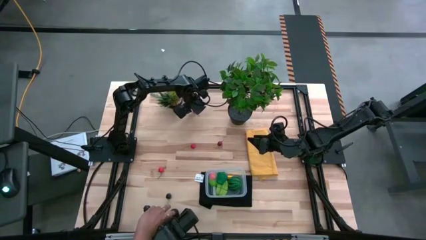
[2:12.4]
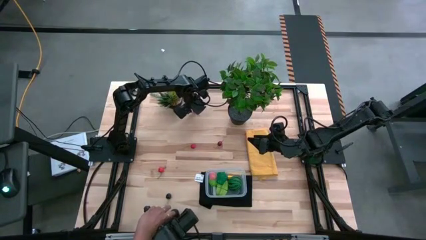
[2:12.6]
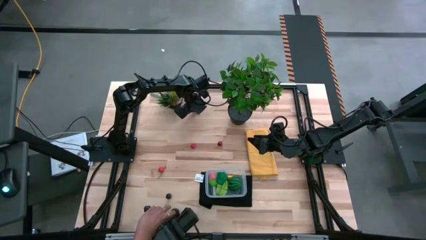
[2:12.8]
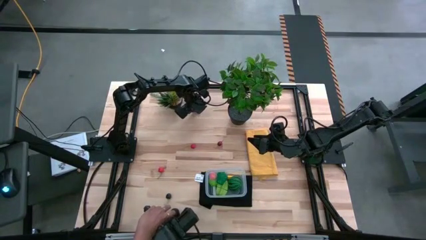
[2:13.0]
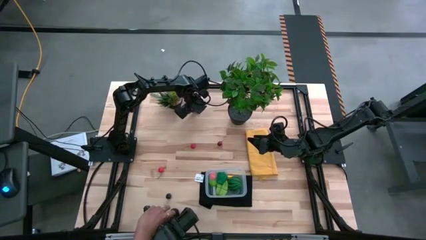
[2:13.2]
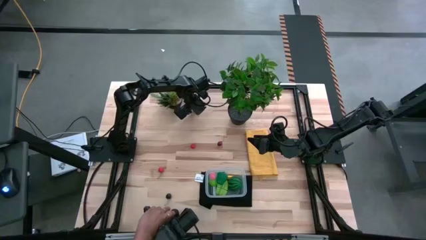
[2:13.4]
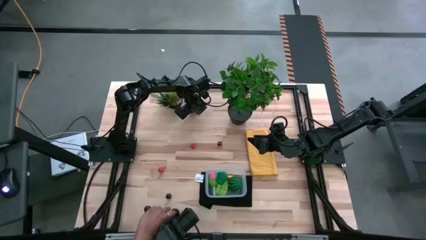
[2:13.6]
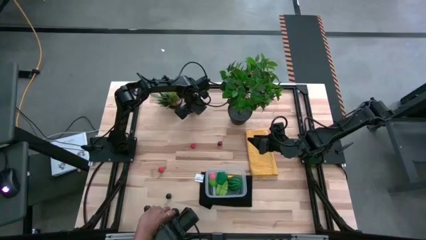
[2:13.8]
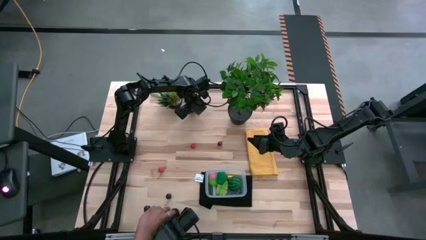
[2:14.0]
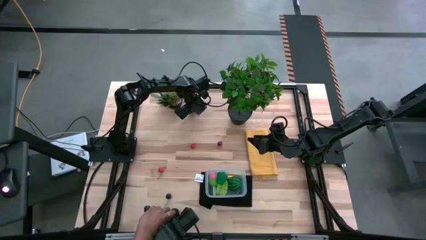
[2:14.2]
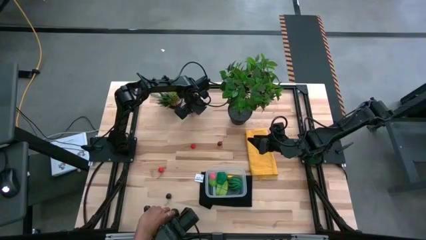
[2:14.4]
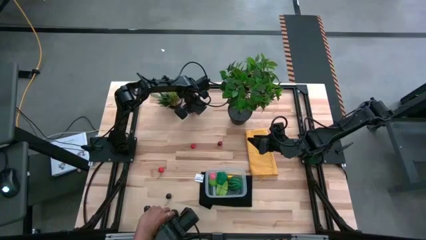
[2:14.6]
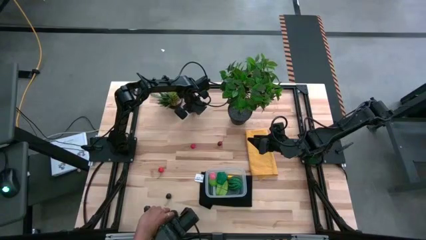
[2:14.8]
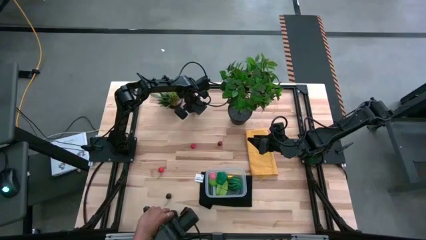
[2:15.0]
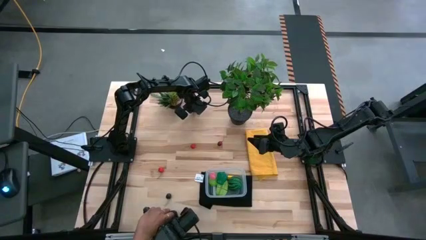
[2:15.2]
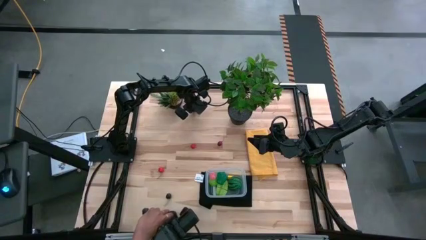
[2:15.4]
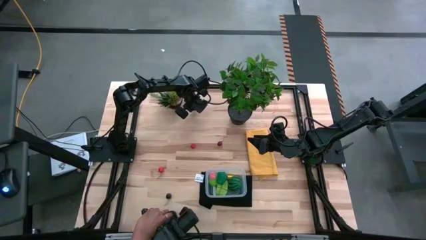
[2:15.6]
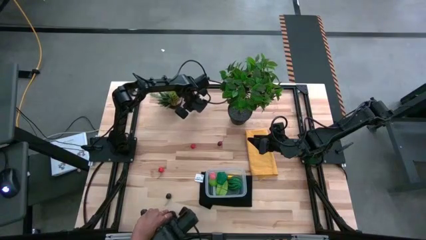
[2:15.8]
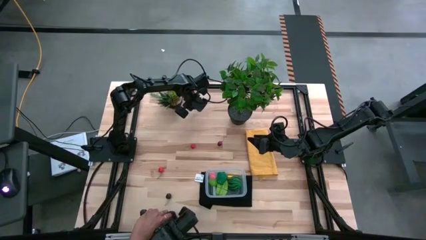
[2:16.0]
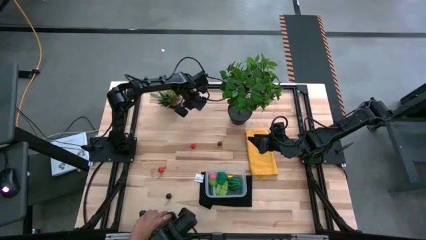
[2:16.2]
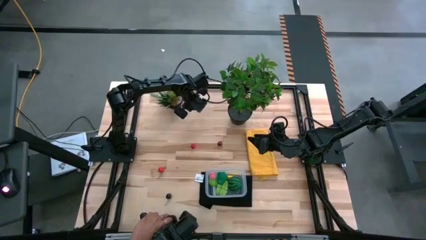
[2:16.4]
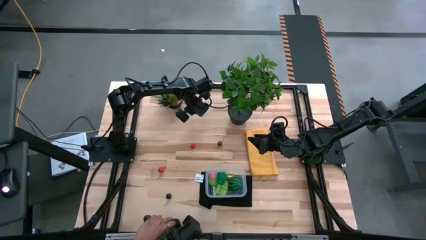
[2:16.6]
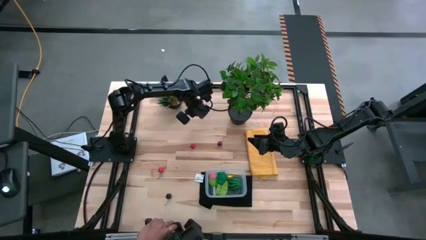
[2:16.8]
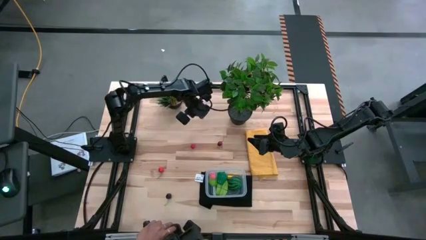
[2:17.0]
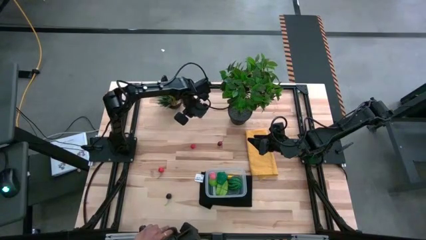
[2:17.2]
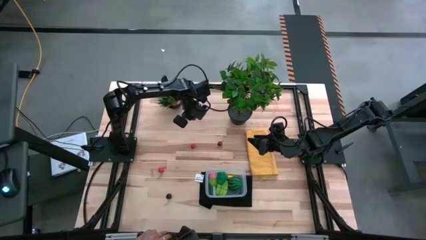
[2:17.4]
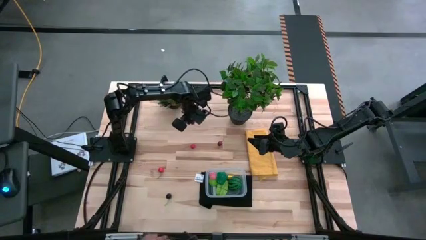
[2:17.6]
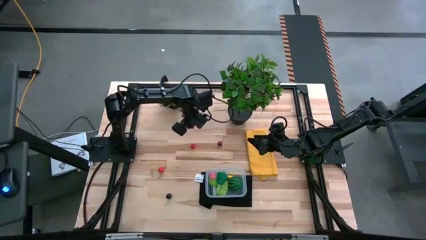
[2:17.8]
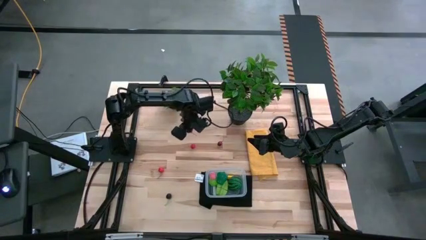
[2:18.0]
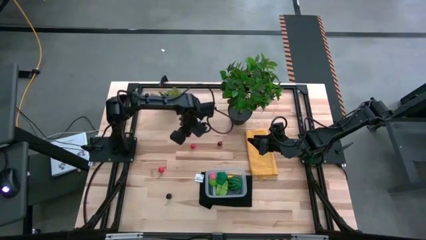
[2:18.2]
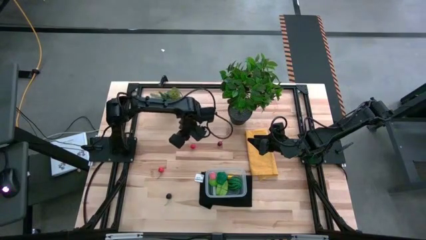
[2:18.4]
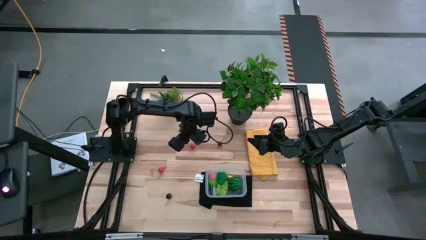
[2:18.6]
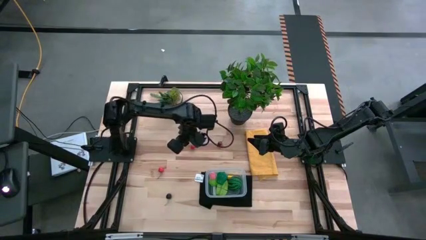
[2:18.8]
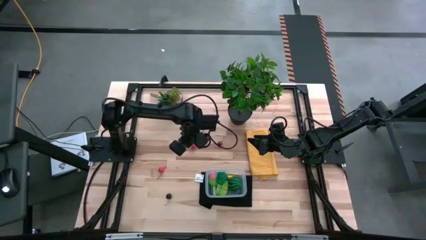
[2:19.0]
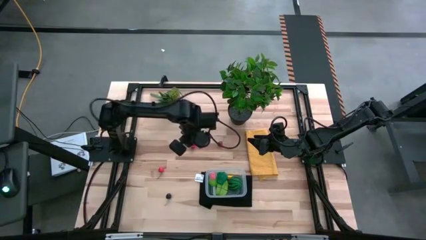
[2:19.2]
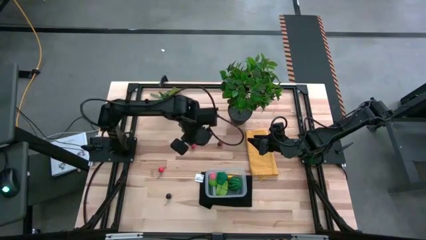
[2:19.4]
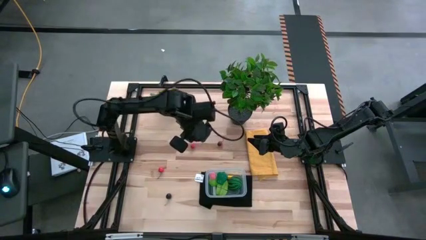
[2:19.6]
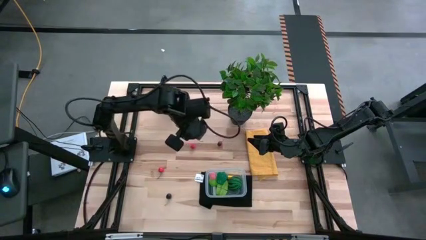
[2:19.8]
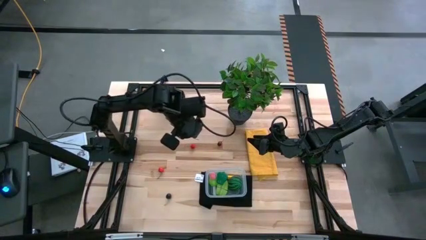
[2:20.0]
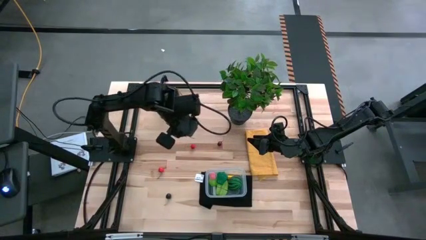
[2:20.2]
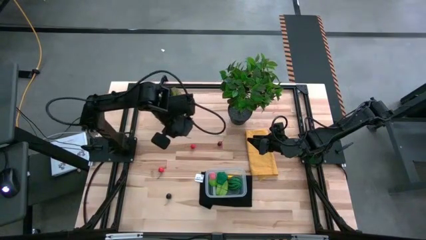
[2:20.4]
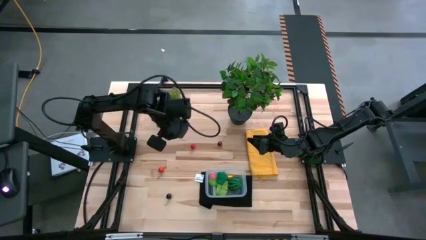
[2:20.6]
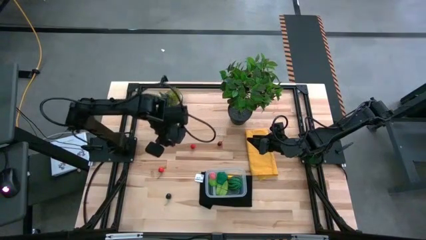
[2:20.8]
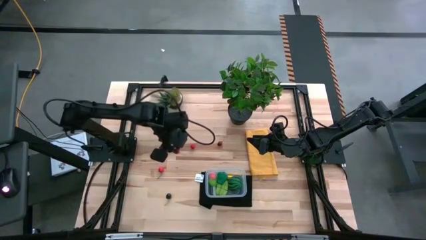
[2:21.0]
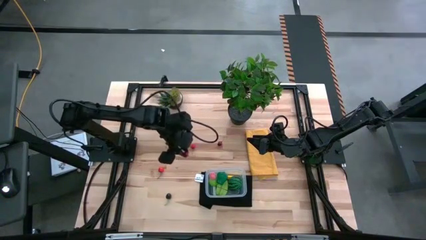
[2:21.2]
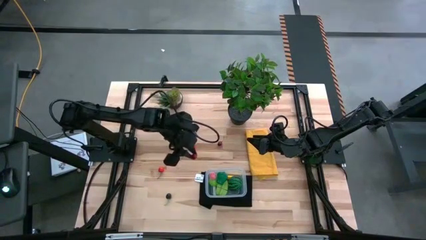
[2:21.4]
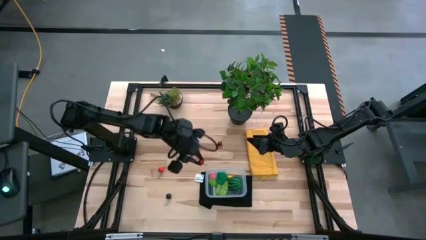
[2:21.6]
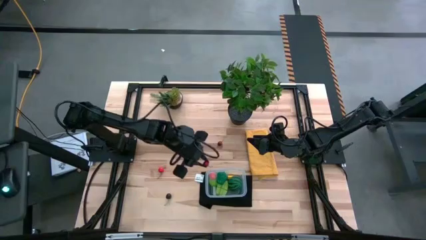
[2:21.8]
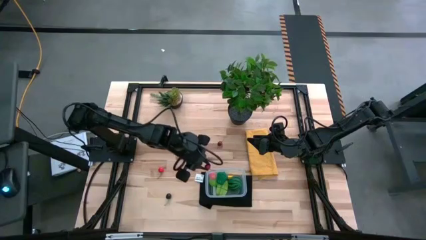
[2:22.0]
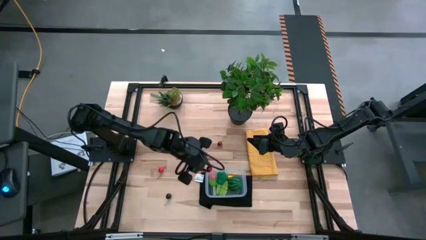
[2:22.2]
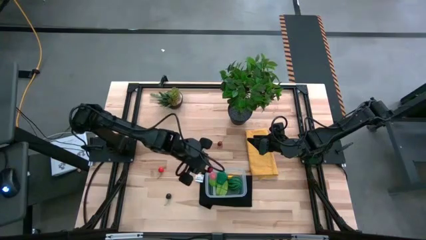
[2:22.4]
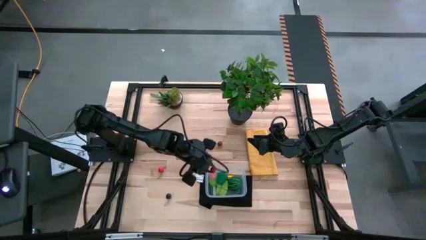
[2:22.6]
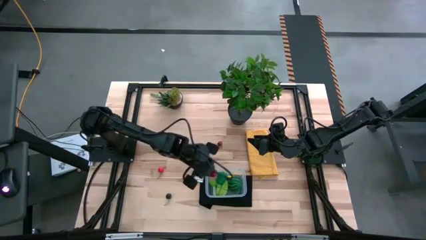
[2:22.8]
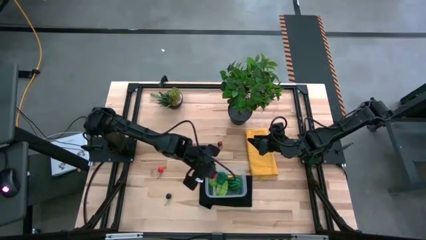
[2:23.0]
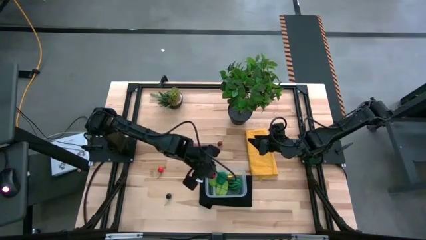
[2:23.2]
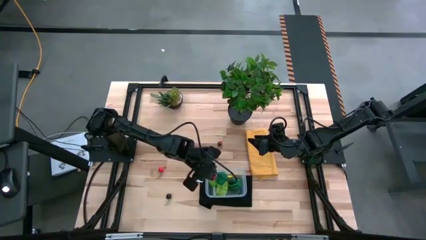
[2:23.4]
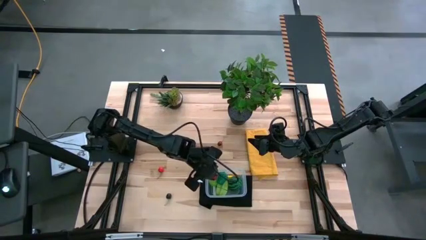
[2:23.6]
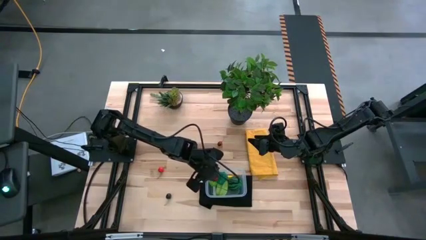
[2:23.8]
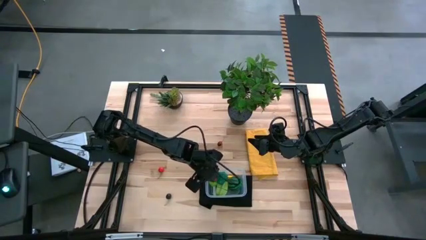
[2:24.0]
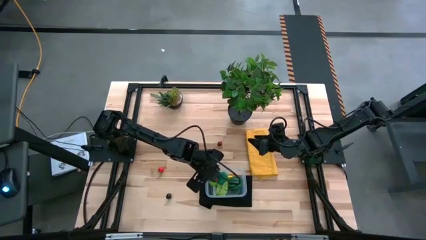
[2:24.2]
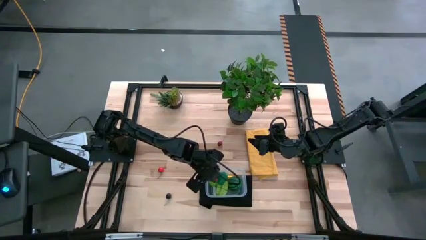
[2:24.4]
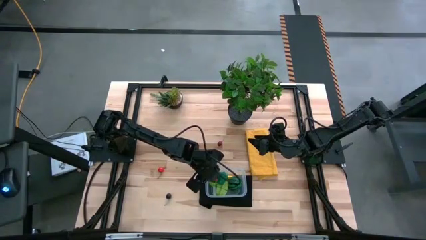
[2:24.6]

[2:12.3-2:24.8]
Task: Pick and placing Produce into tupperware
Put the top red cherry into the transparent bin

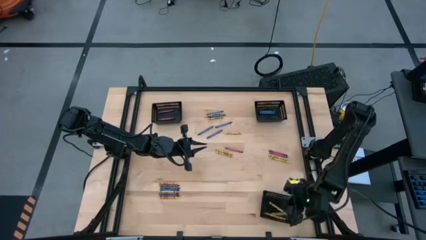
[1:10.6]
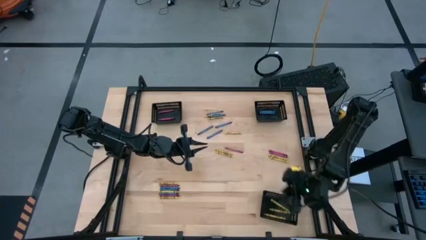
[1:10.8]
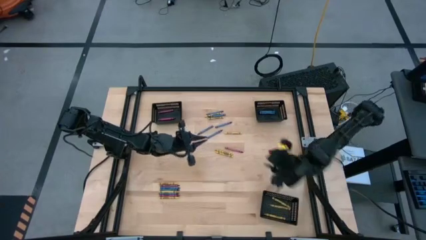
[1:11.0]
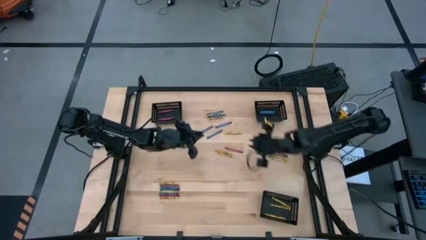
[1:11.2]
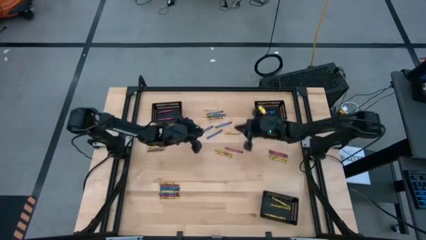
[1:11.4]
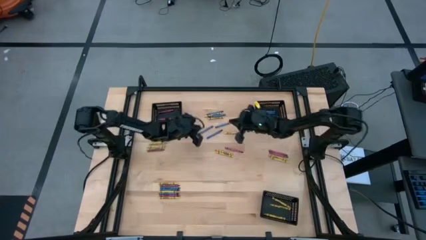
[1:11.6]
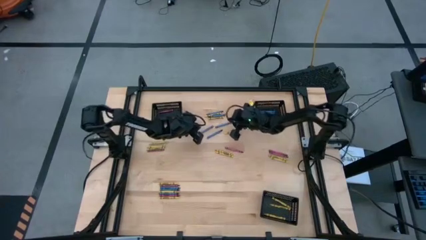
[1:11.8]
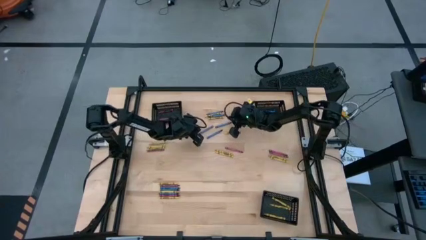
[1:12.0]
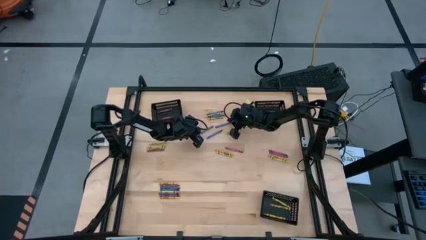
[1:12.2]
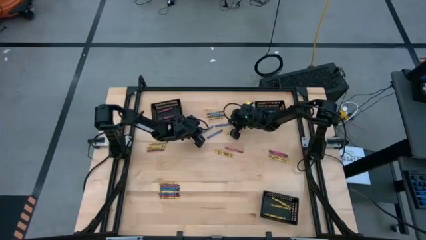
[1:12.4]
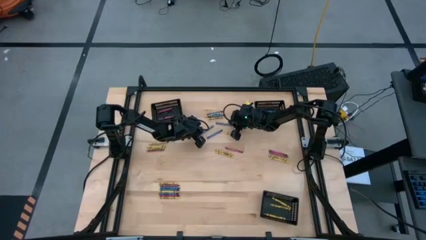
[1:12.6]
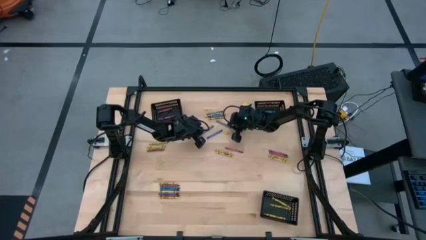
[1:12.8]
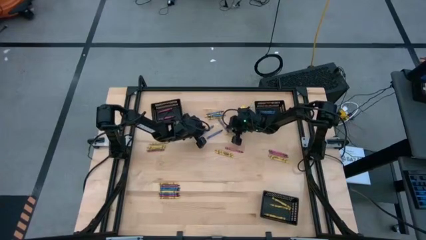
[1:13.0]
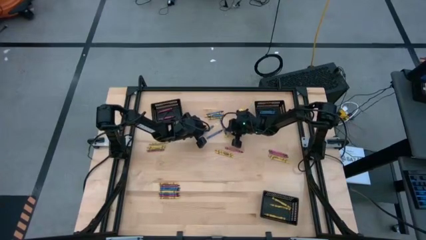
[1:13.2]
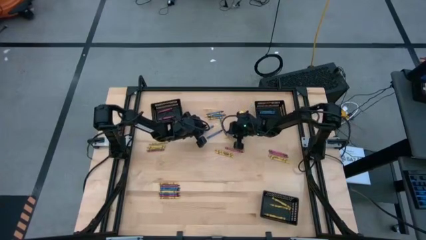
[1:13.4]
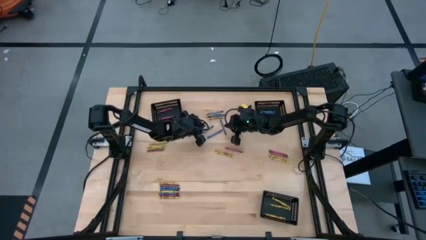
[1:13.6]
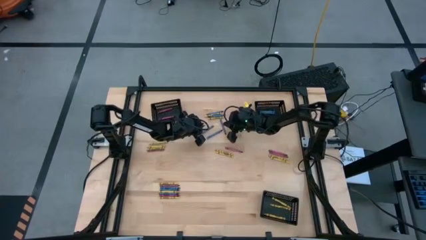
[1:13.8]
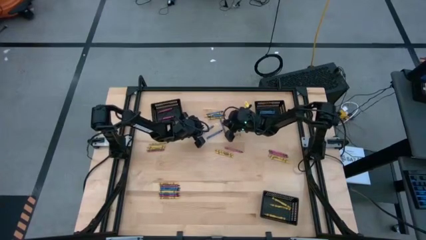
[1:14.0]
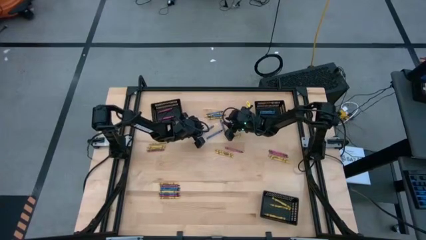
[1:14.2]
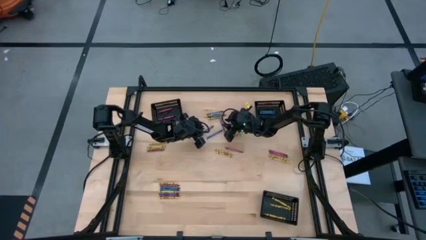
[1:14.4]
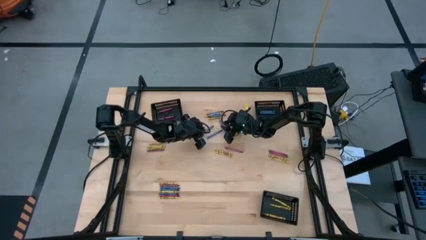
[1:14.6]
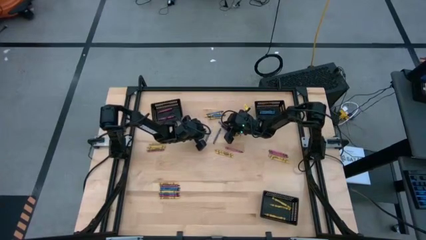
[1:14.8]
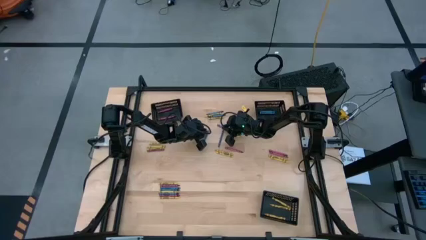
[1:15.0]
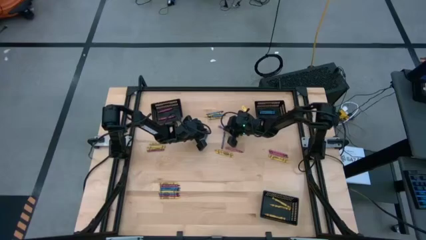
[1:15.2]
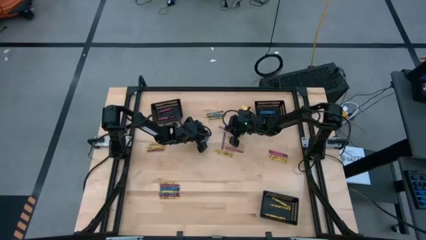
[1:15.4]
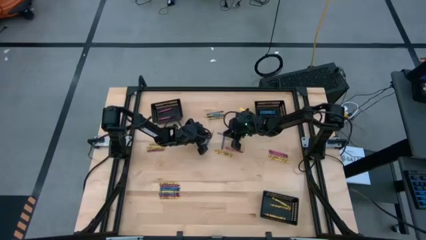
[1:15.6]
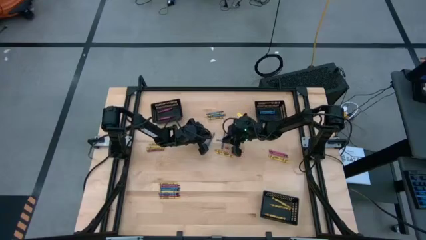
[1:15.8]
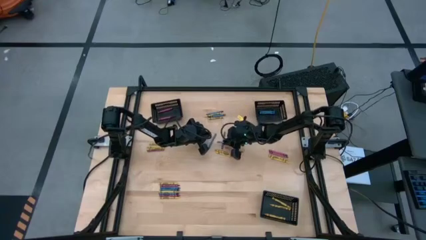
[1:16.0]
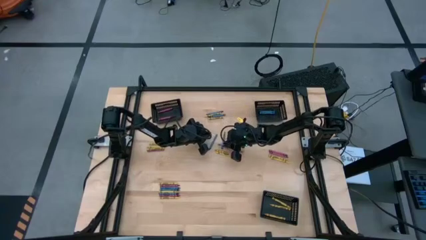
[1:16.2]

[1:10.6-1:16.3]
Task: Sort crayons
Adjust the blue crayon
